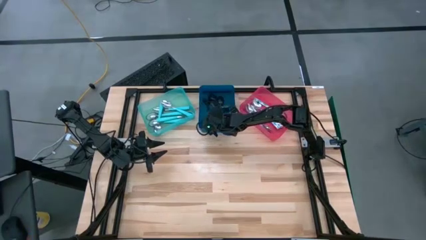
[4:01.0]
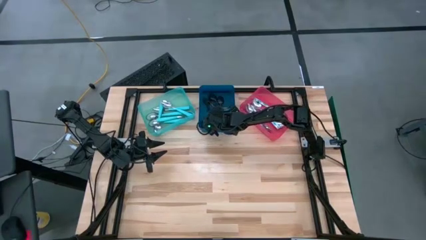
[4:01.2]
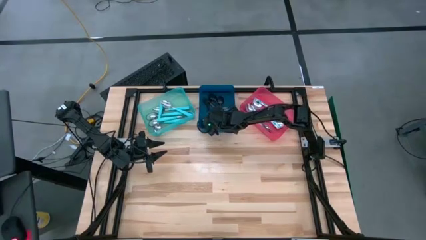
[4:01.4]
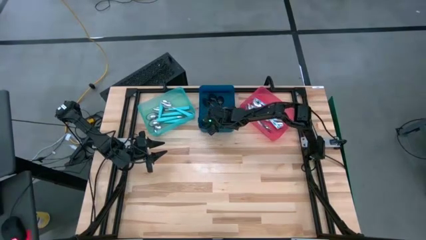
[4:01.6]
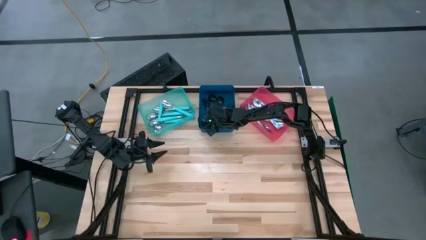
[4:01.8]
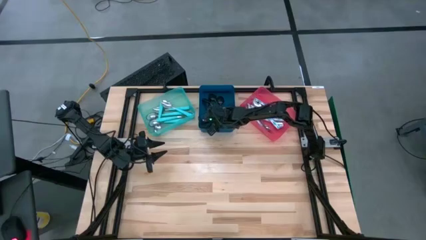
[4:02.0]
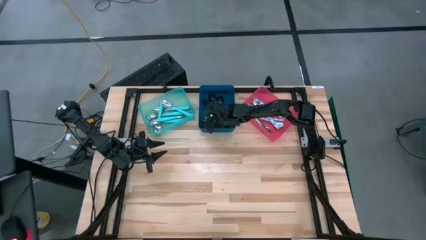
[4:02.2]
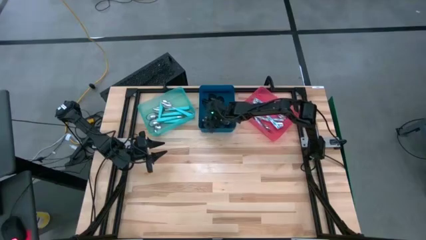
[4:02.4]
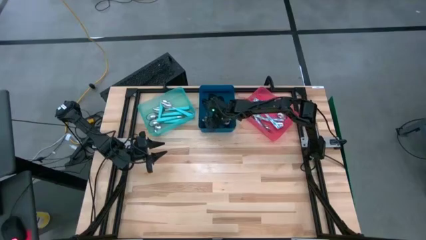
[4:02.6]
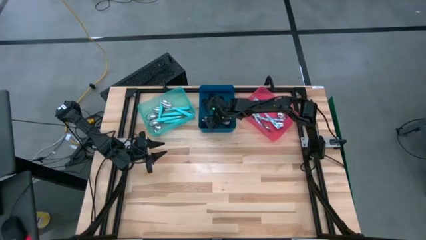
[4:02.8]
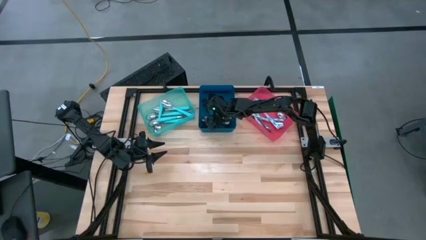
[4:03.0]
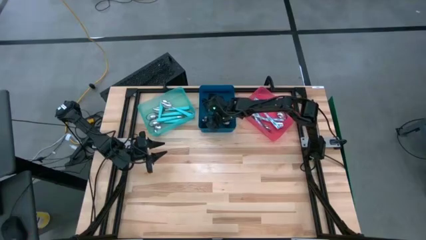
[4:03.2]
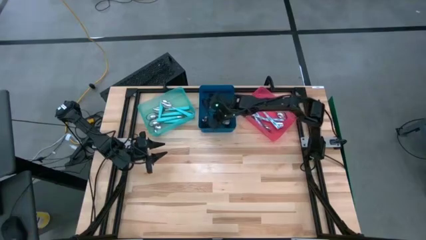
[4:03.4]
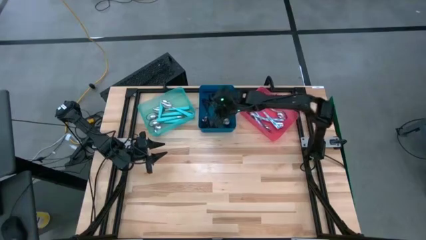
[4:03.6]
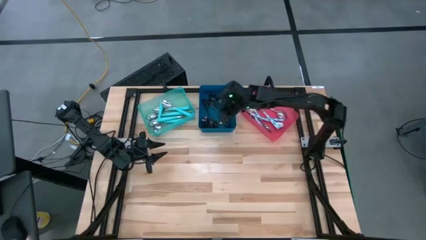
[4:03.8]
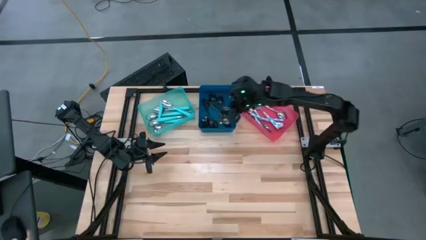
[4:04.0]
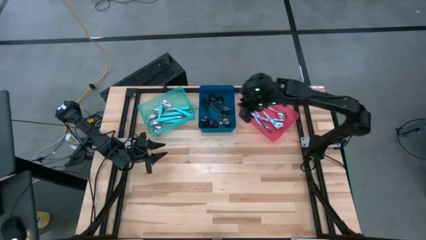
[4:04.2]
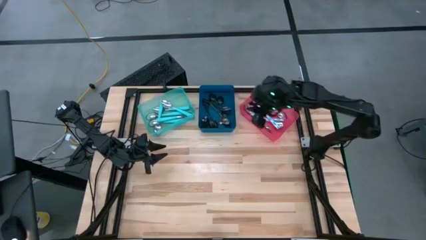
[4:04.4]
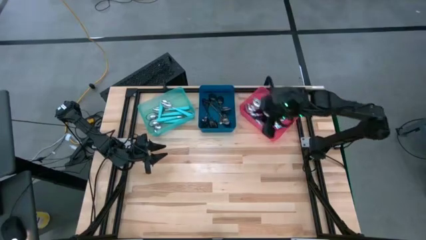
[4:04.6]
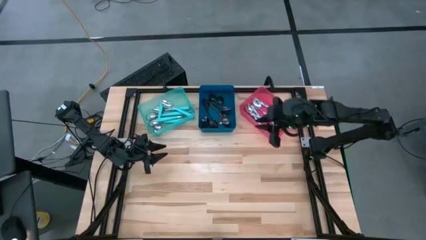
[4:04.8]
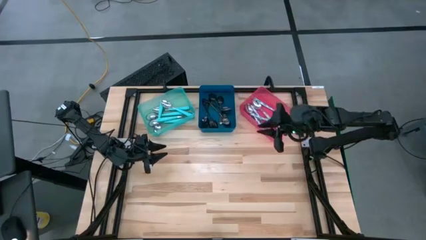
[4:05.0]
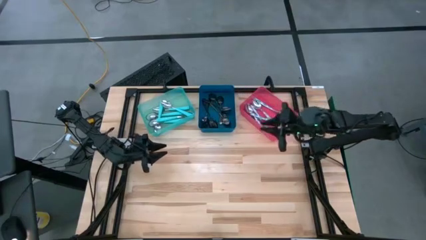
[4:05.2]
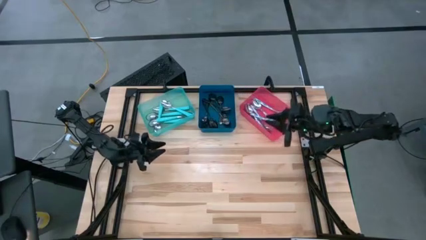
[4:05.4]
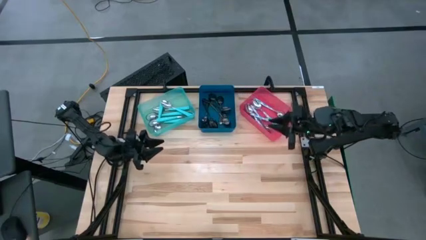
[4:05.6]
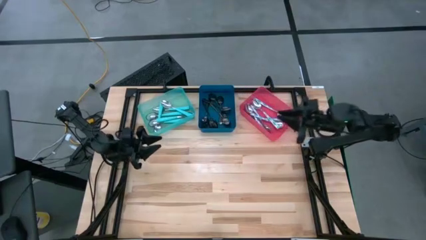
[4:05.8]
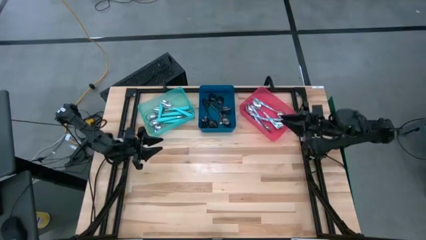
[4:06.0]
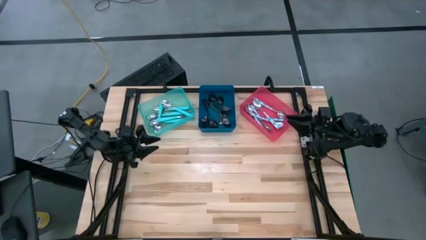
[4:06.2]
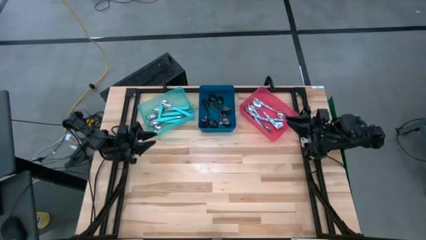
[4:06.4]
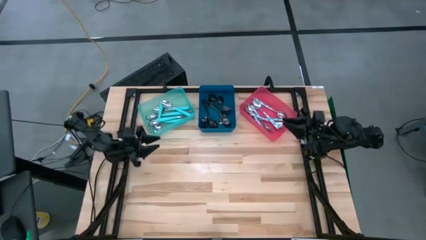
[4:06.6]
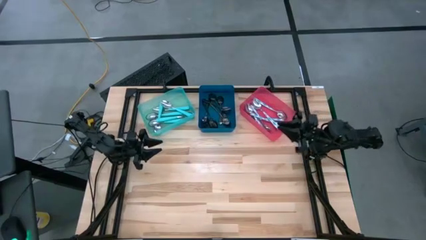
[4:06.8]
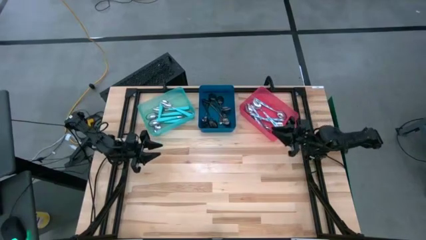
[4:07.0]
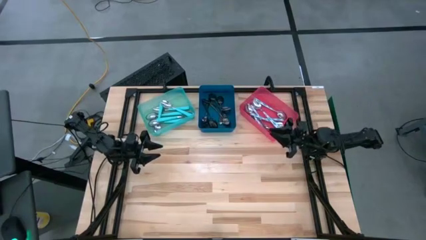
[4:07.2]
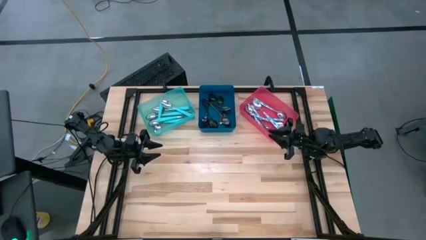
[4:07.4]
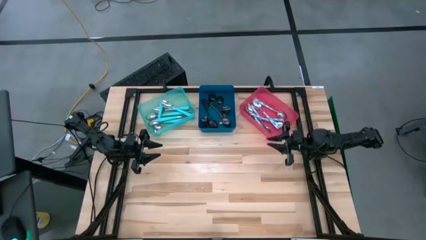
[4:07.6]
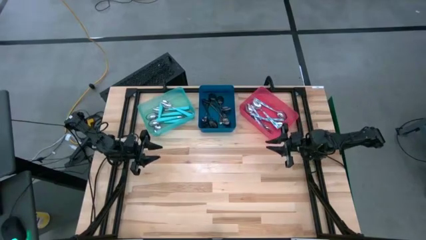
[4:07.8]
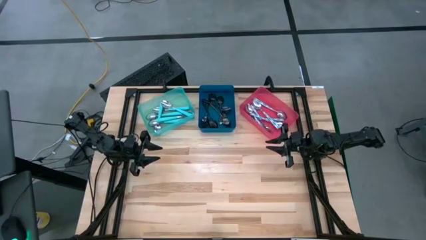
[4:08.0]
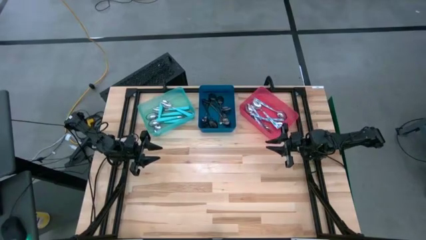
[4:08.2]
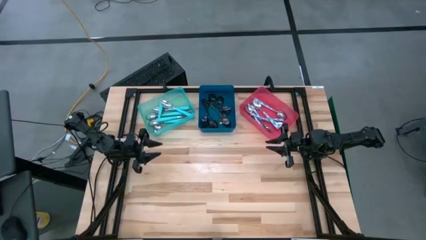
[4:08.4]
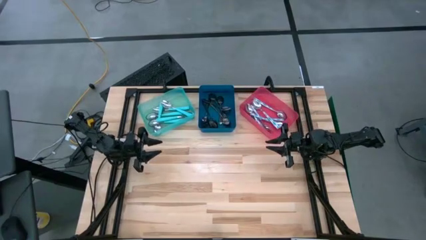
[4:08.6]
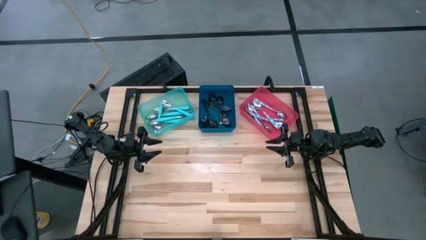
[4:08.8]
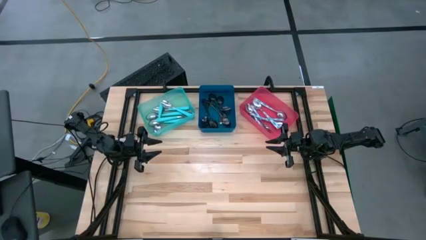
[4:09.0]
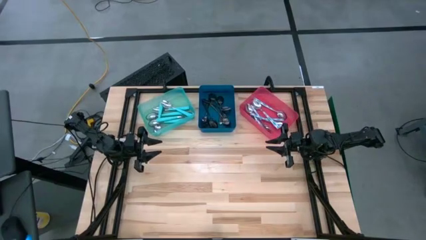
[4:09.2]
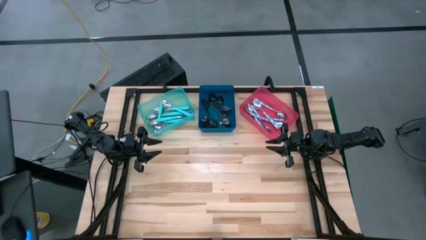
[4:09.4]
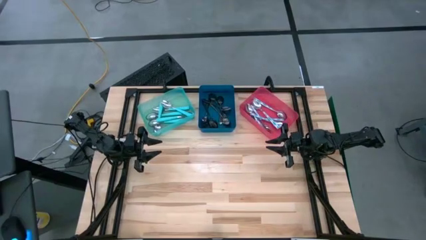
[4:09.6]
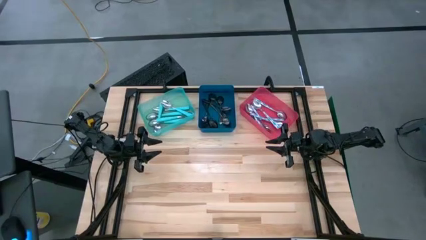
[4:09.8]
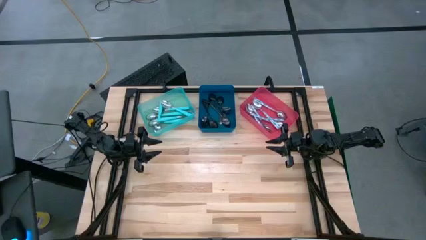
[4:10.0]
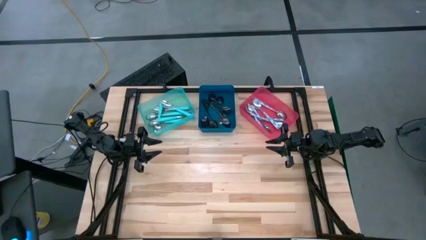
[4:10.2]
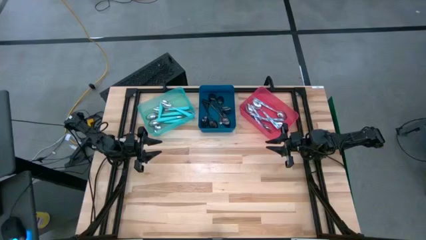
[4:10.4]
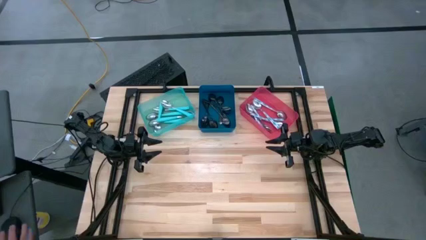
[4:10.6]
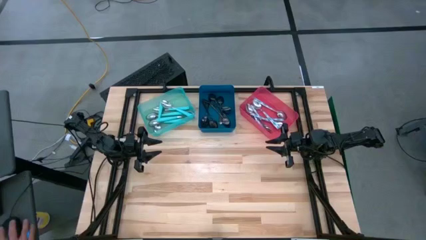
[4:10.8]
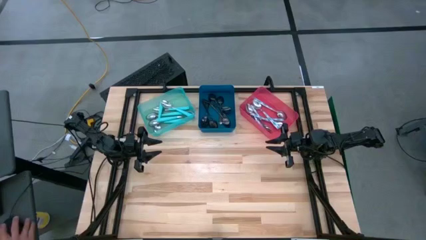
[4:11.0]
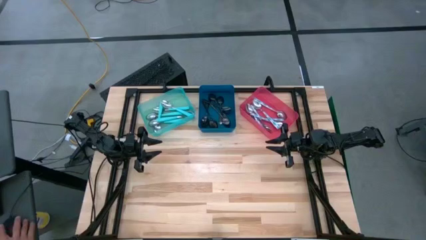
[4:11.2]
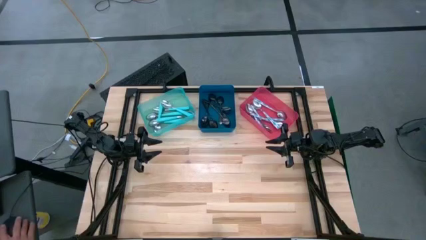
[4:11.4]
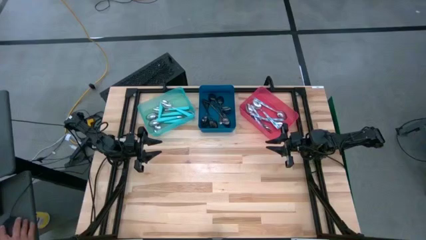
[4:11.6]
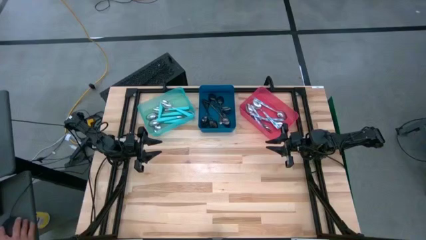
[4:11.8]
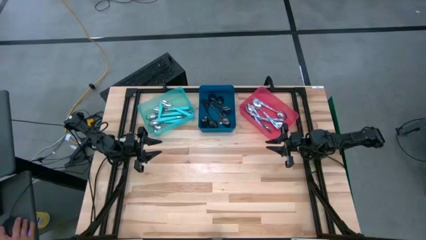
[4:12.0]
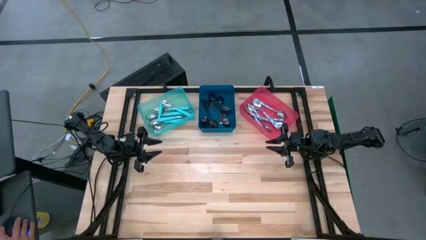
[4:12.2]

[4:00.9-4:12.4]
Task: Sort silverware by color (type)
Return to Home Position
